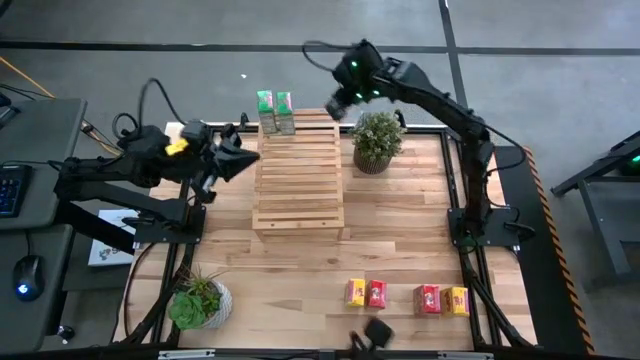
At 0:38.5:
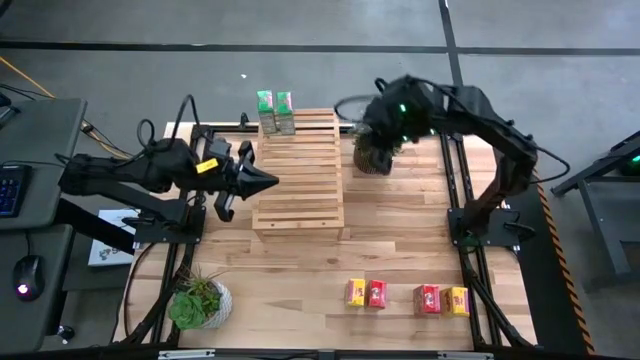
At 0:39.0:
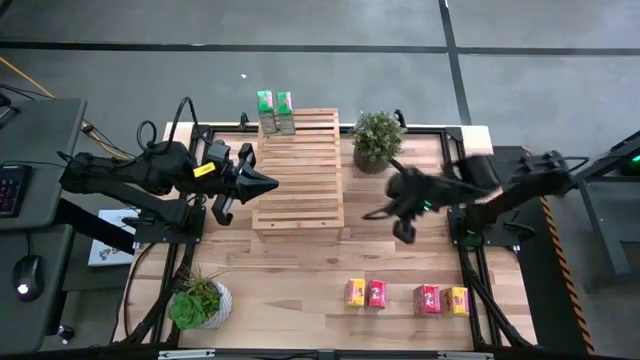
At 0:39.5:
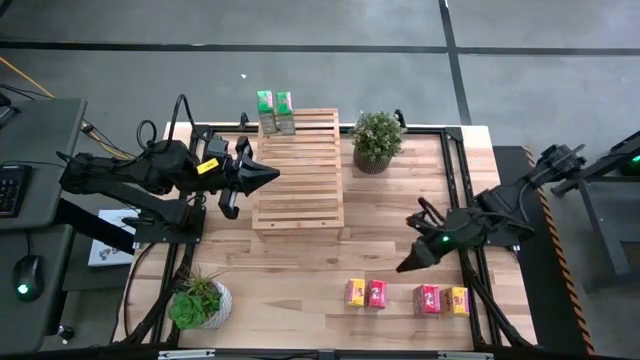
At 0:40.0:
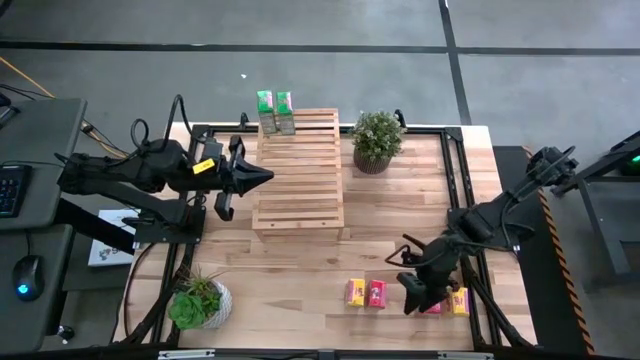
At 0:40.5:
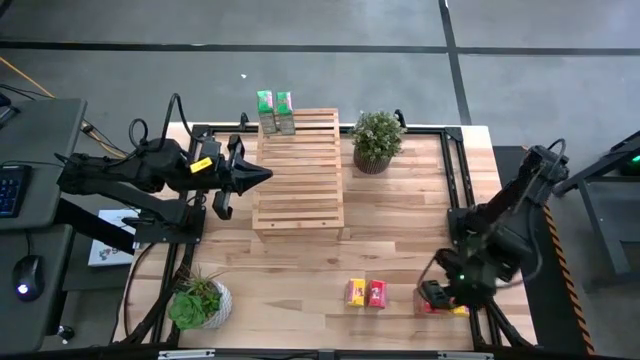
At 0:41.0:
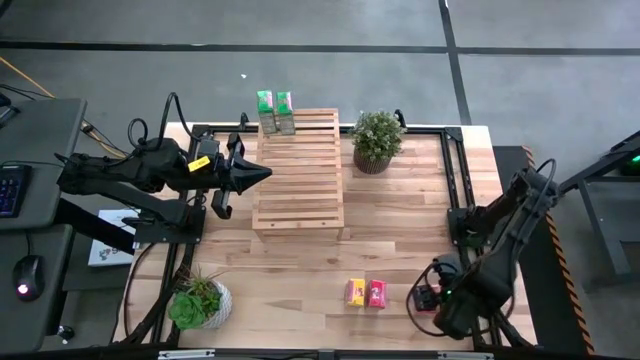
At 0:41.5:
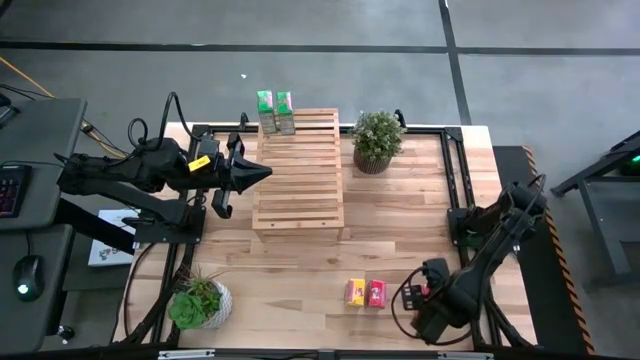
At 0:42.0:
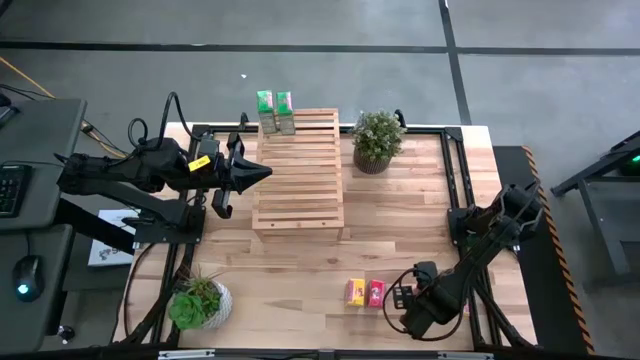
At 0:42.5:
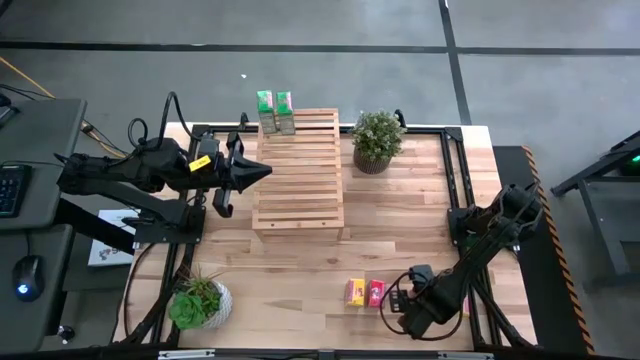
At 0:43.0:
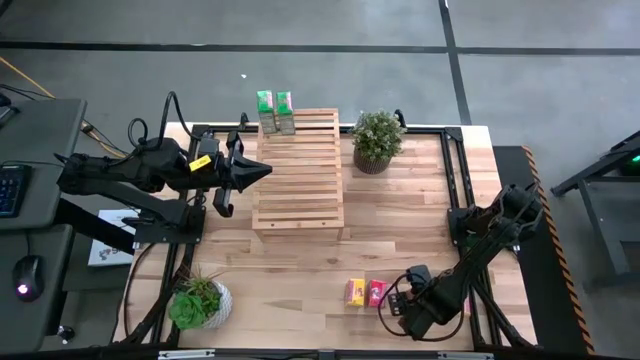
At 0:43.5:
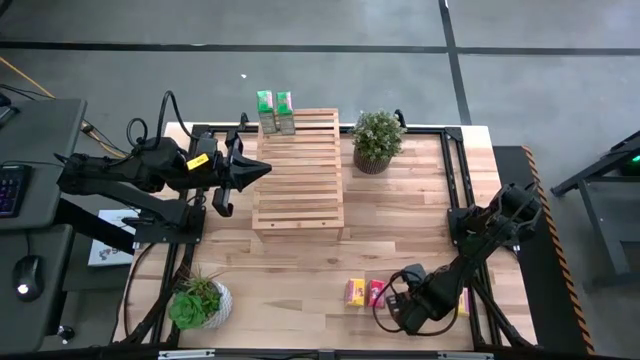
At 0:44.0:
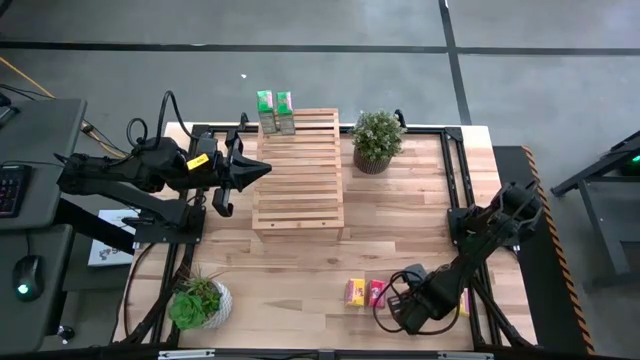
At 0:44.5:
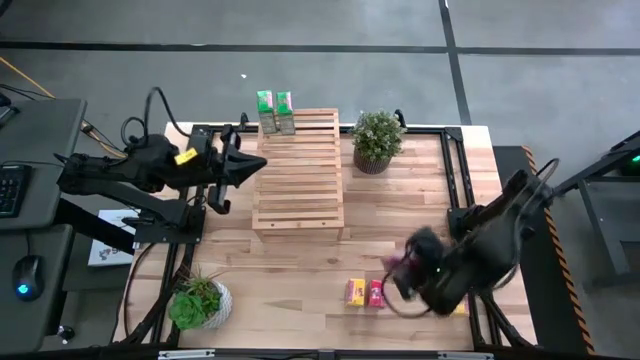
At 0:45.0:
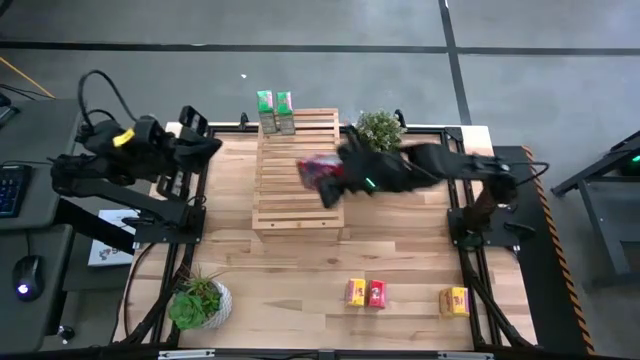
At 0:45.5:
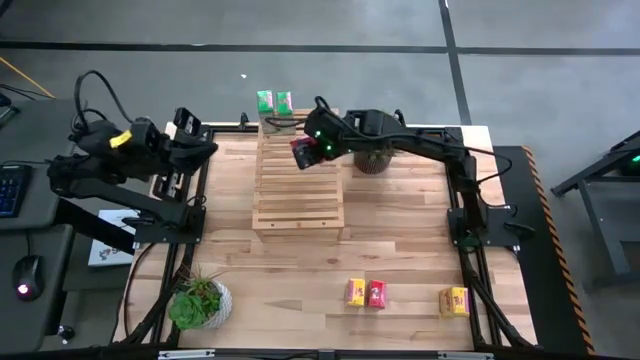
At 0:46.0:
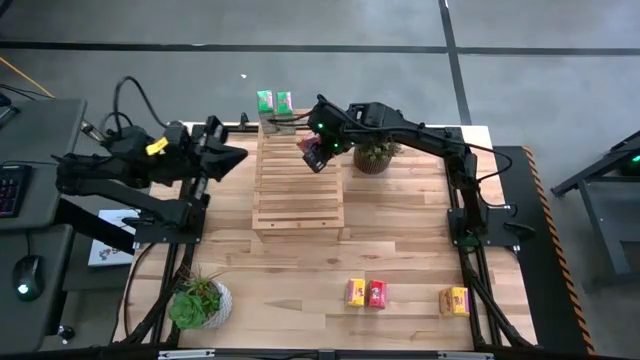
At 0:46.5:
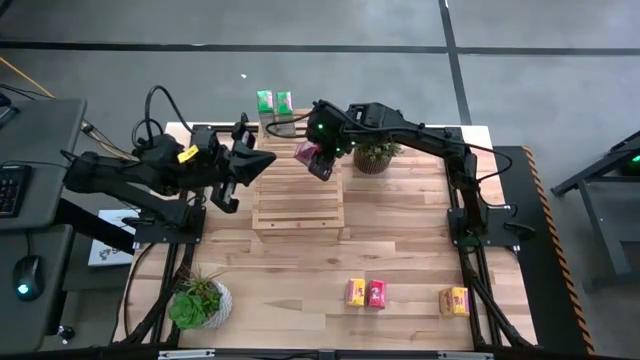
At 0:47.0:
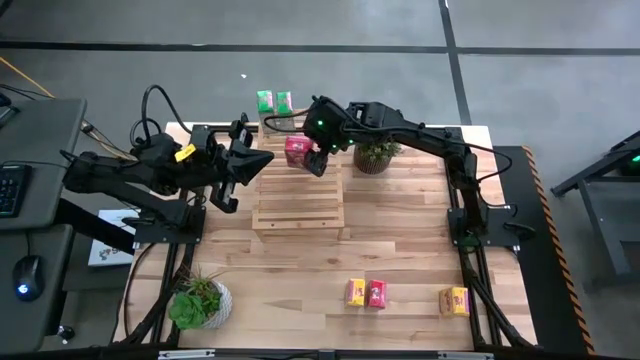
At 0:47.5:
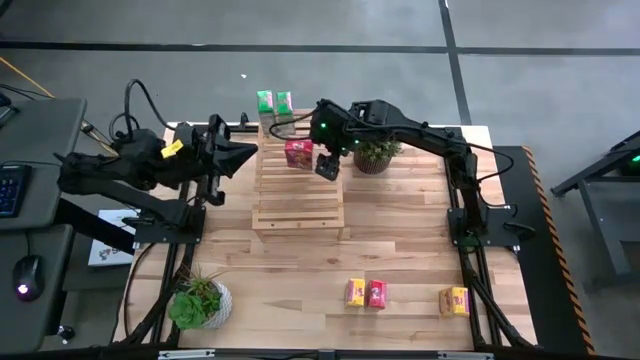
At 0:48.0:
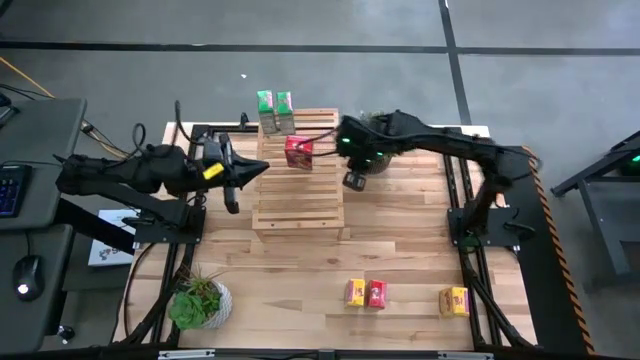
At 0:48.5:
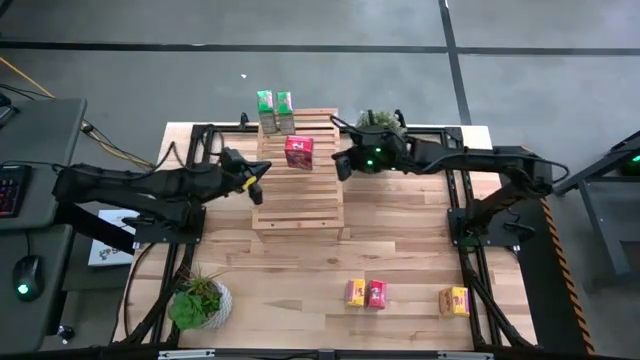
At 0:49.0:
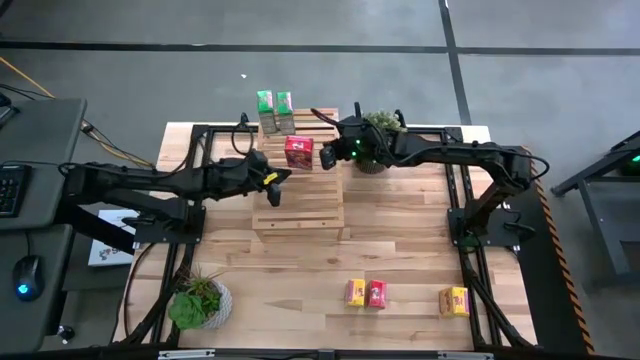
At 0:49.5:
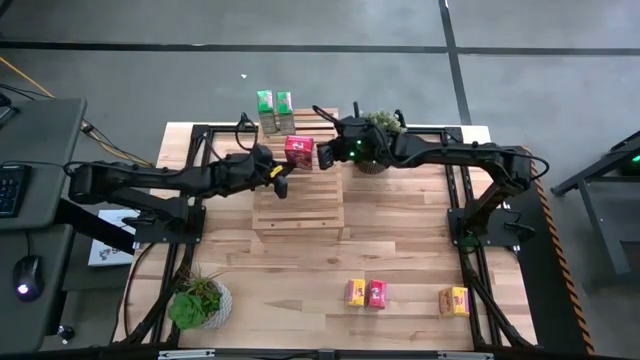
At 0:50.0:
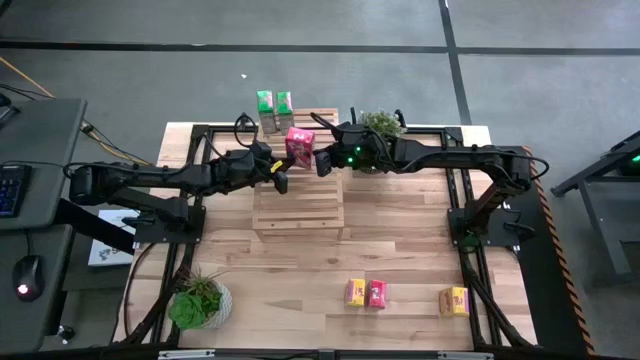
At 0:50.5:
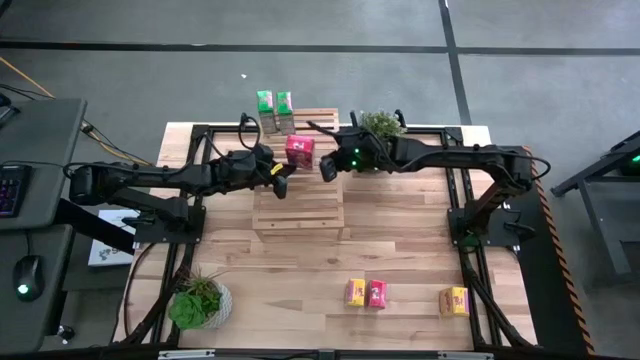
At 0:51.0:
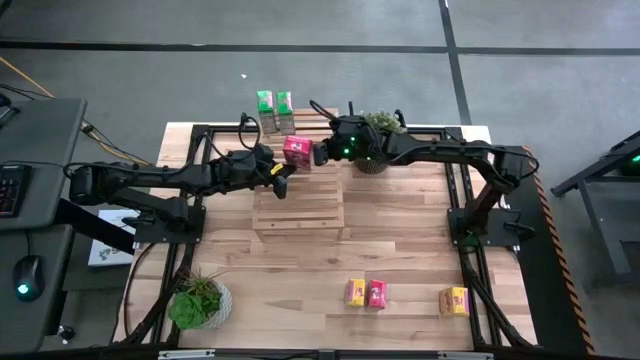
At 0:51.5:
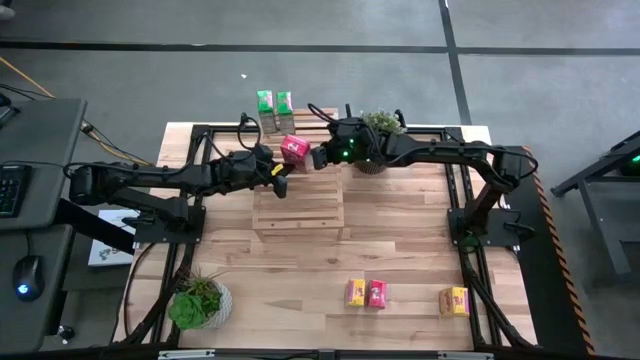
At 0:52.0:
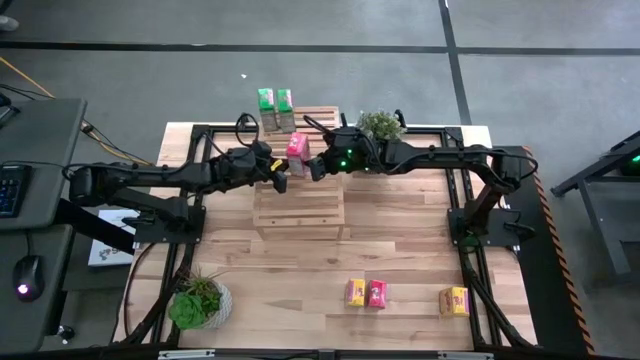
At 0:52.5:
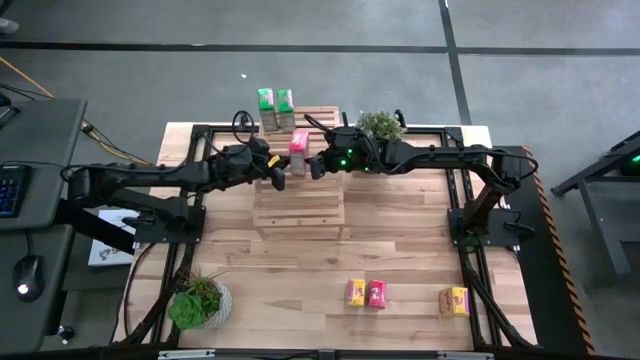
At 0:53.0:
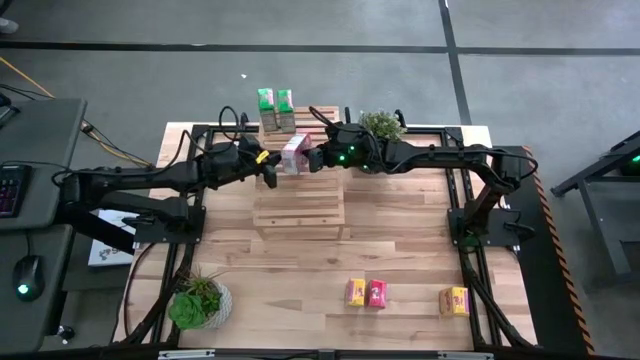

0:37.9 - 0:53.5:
Task: Stack cereal on shelf
Put the right red cereal box on the shelf

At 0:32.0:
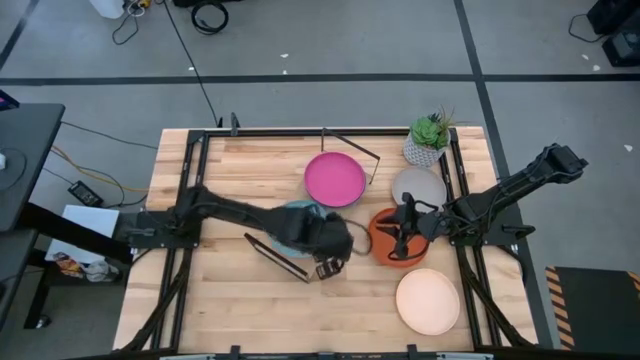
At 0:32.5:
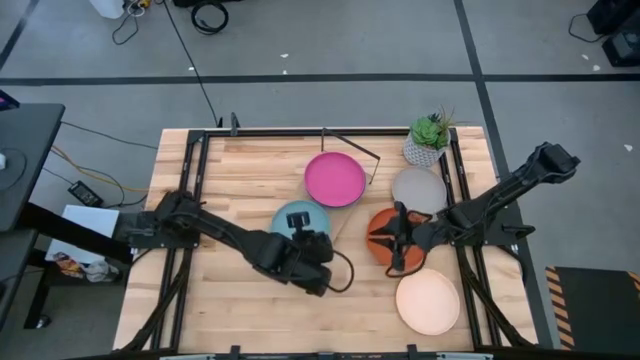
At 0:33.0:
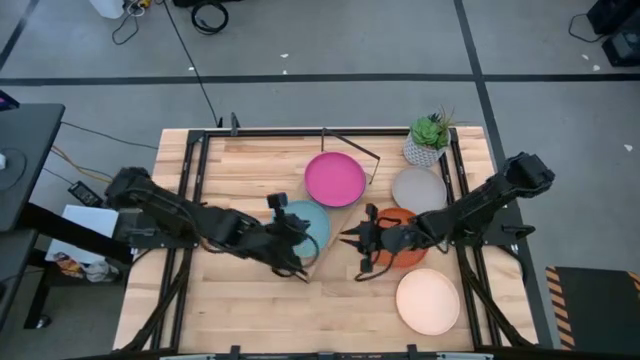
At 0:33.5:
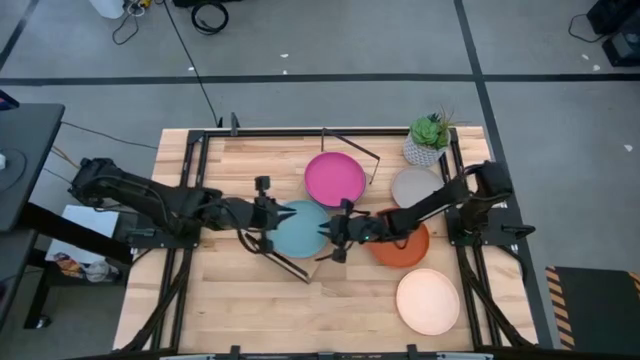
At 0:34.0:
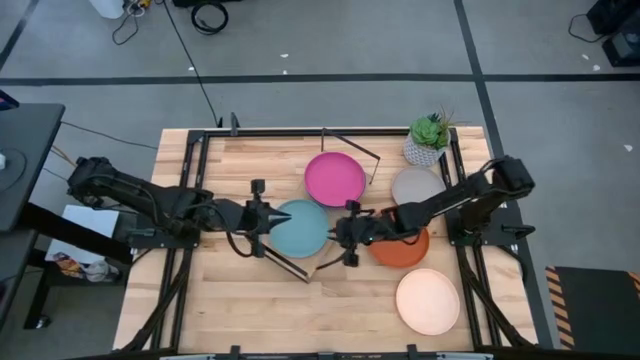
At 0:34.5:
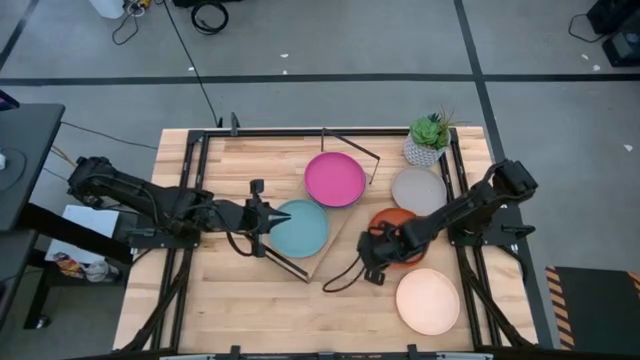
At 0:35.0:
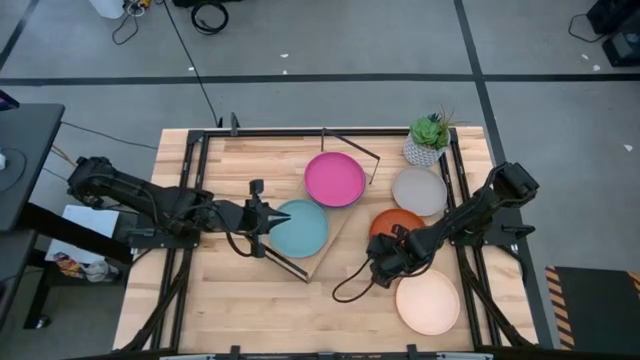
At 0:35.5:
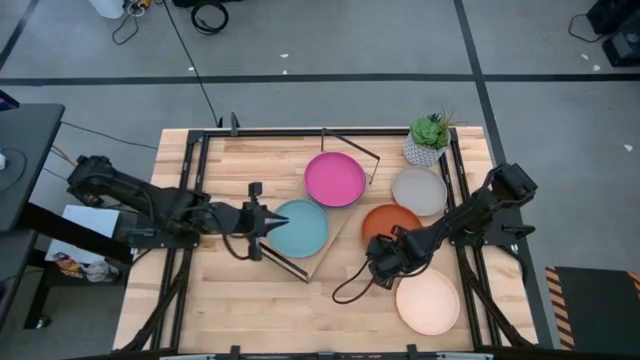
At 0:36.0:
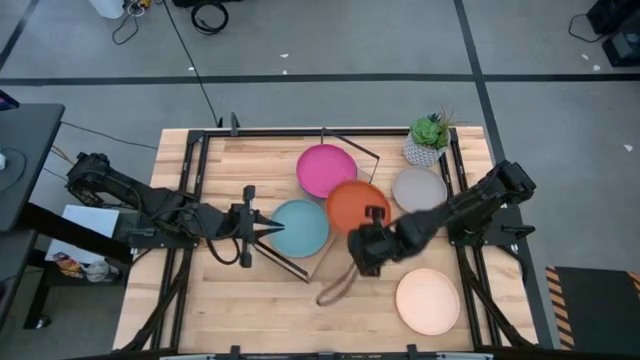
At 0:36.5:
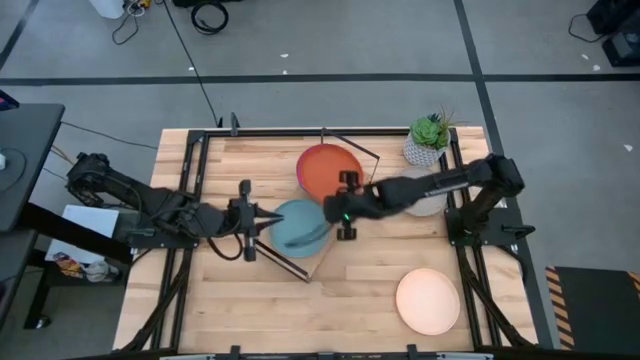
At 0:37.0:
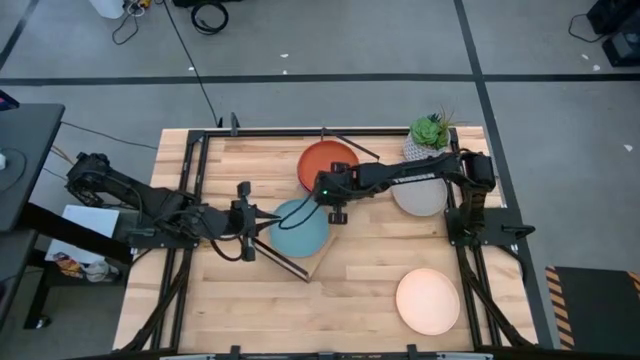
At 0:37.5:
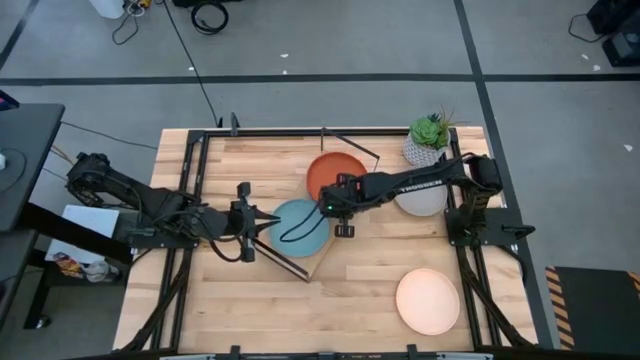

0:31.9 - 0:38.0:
Task: Place and stack plates onto a shelf
Stack the orange plate on top of the pink plate on the shelf
